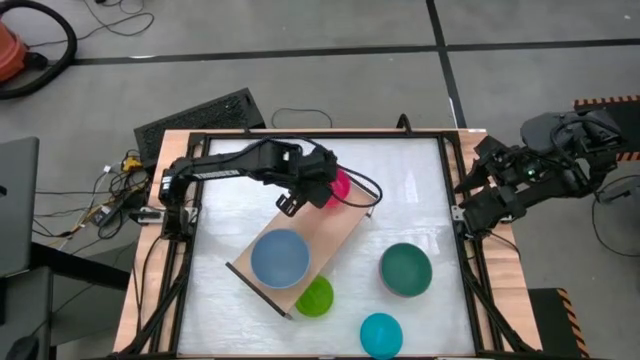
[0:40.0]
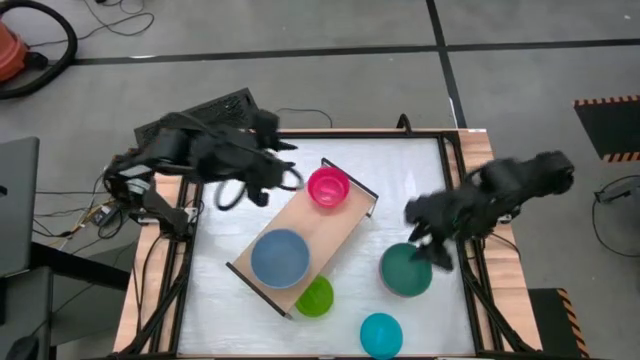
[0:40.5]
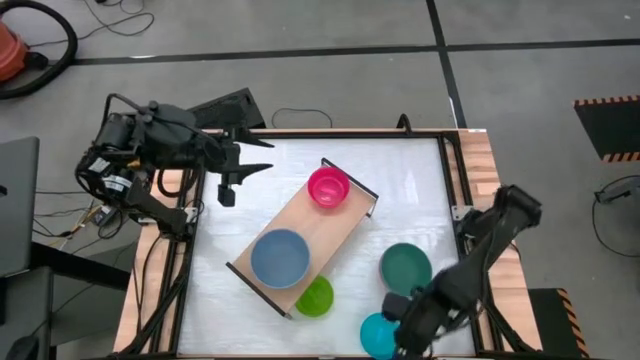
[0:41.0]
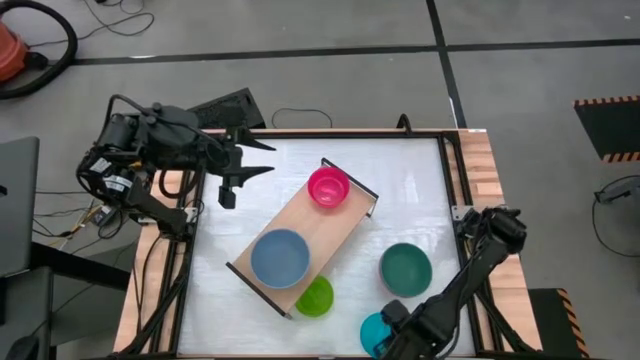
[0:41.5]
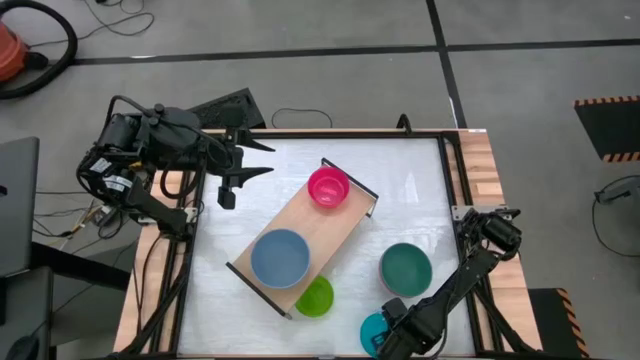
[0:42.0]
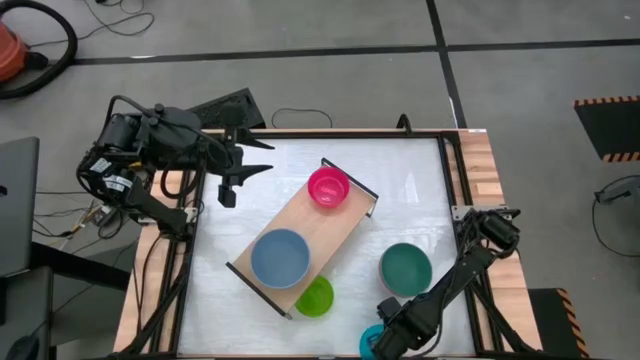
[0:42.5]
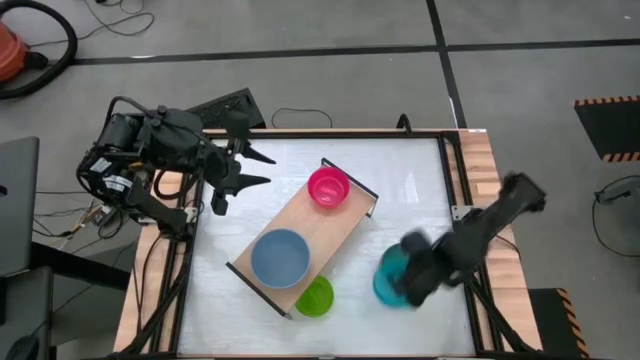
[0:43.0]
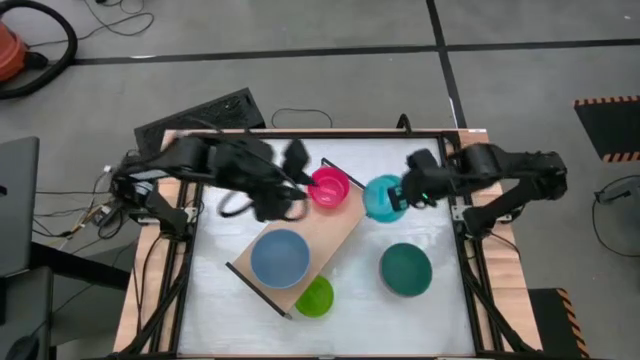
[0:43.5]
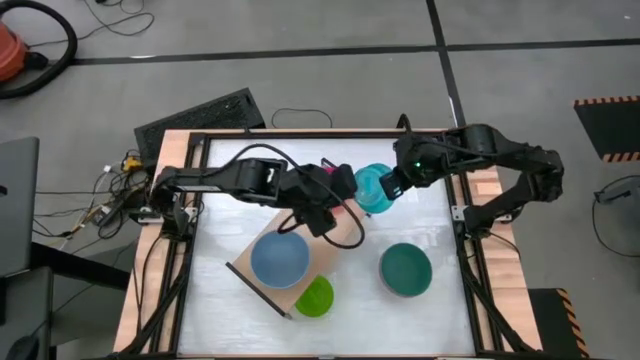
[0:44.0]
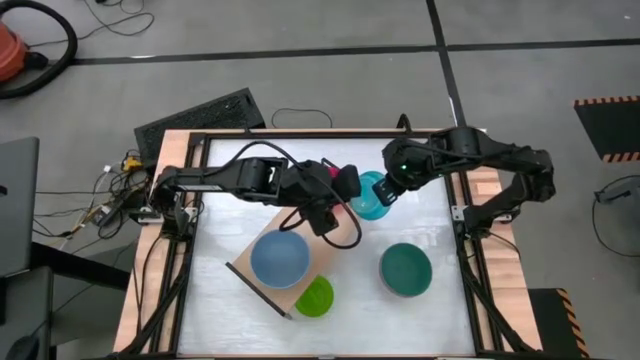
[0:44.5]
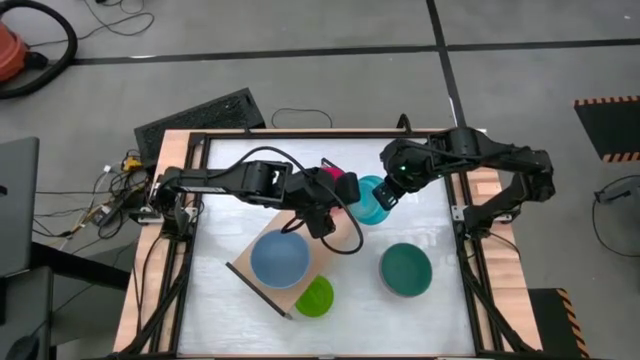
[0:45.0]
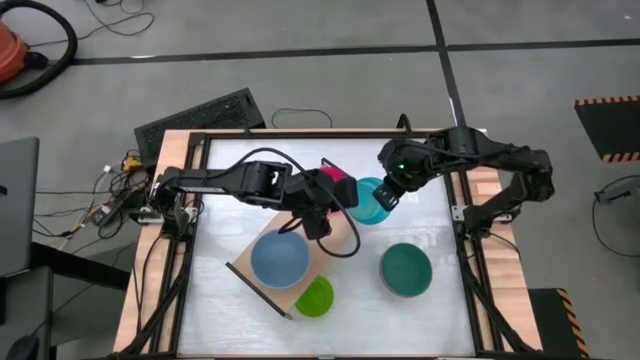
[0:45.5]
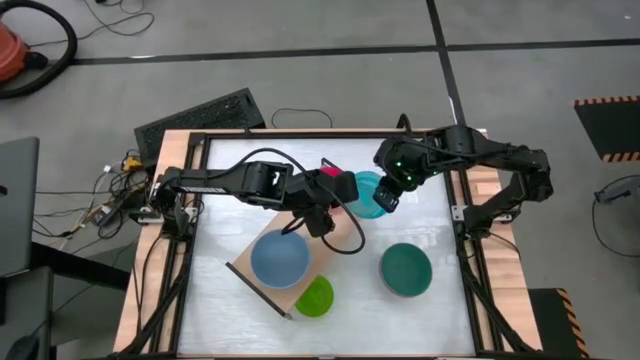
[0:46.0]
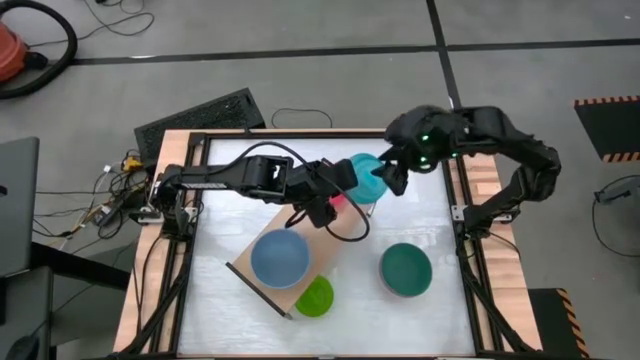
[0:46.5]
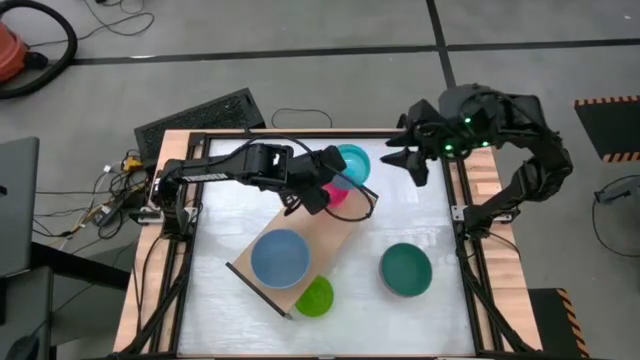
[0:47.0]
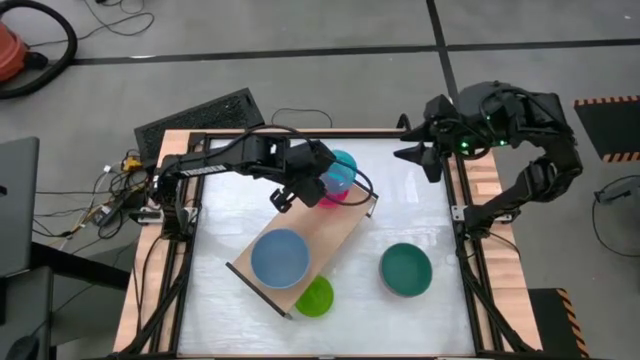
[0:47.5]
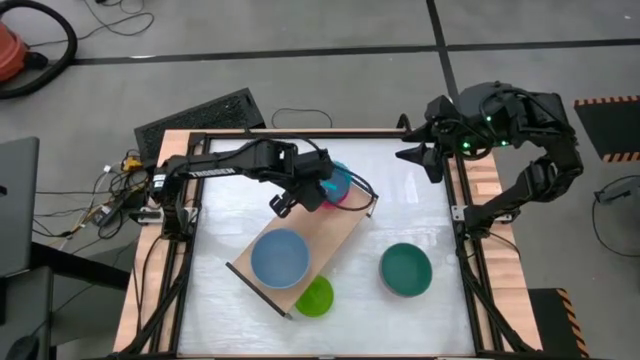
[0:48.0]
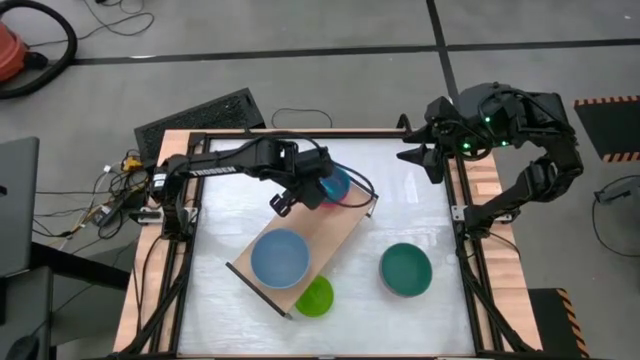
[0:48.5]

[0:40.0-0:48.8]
Task: Place and stack bowls onto a shelf
Stack the light blue bowl onto the pink bowl on the shelf

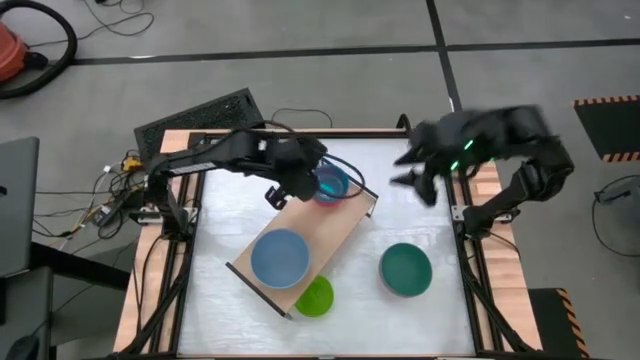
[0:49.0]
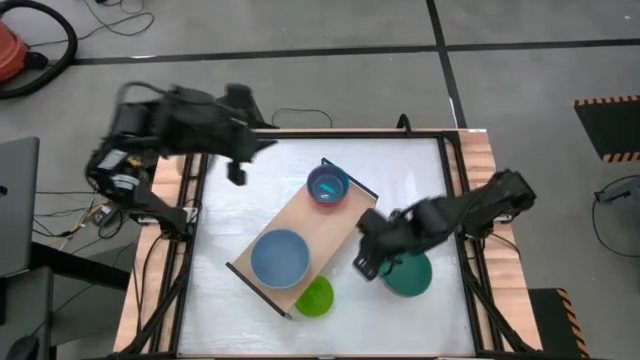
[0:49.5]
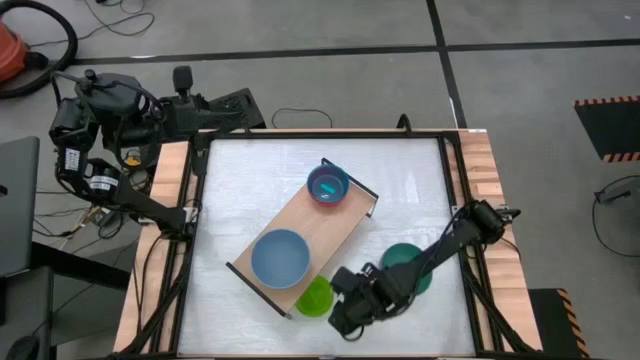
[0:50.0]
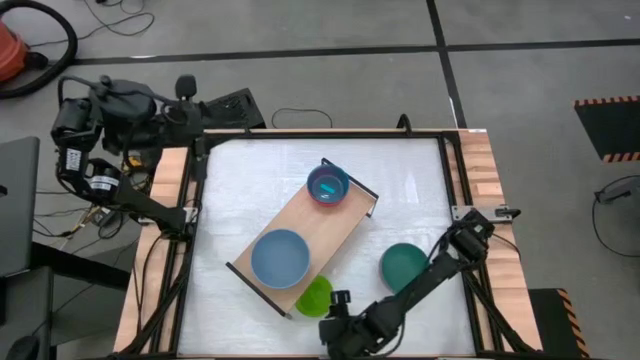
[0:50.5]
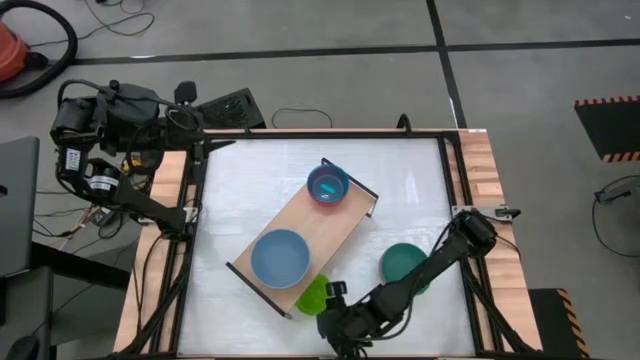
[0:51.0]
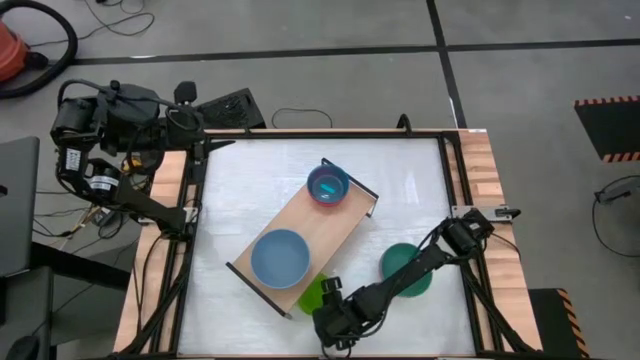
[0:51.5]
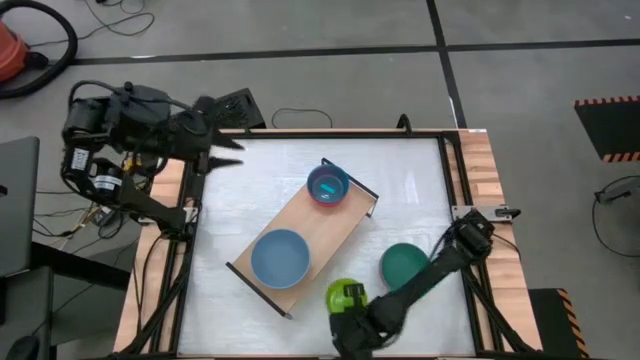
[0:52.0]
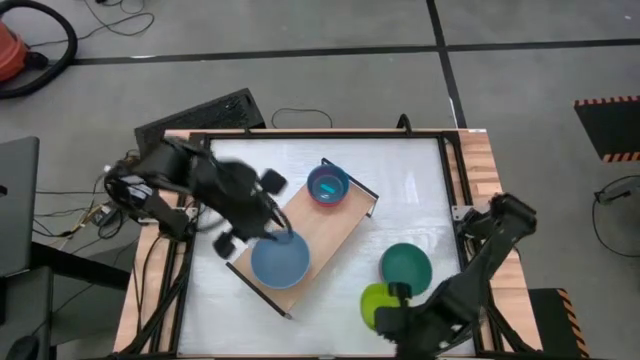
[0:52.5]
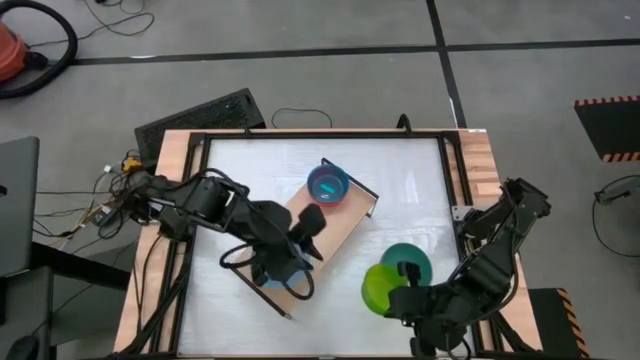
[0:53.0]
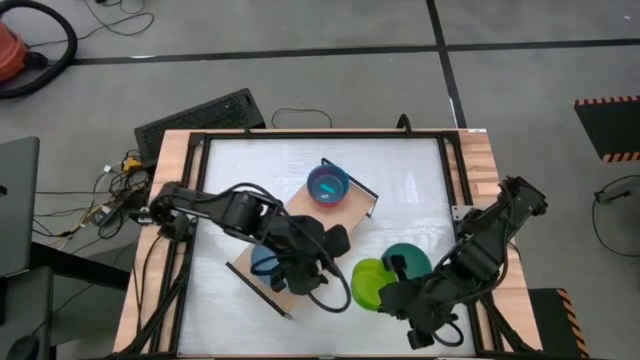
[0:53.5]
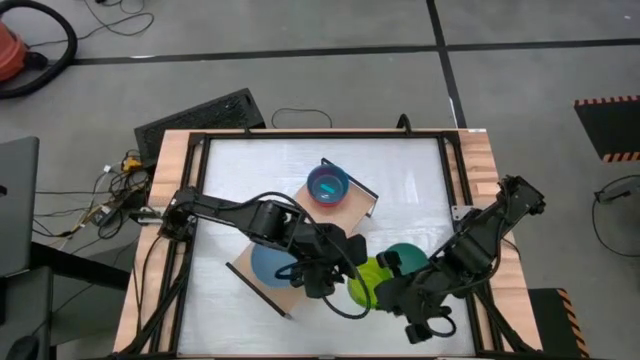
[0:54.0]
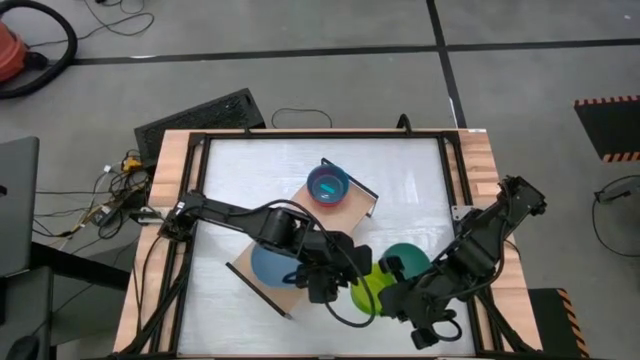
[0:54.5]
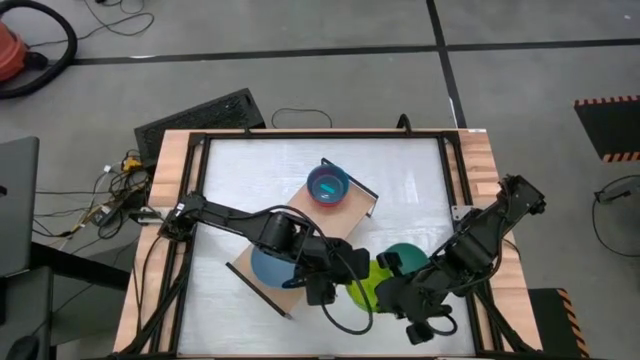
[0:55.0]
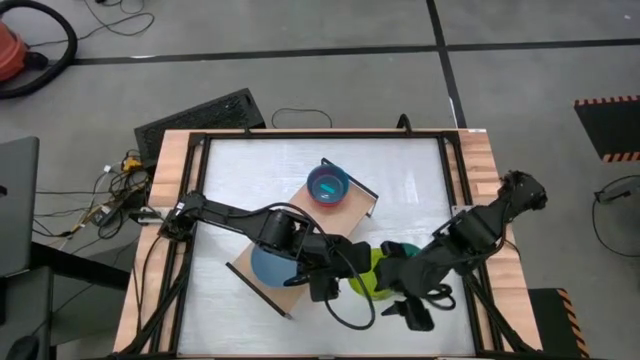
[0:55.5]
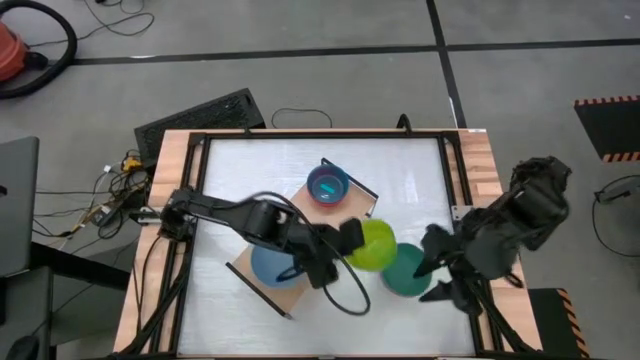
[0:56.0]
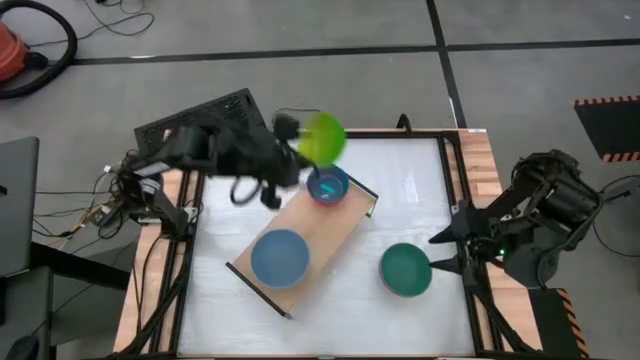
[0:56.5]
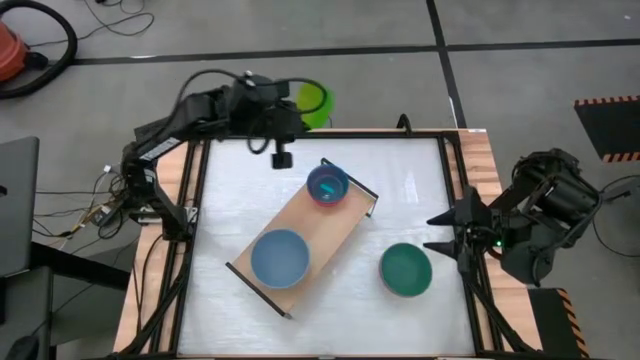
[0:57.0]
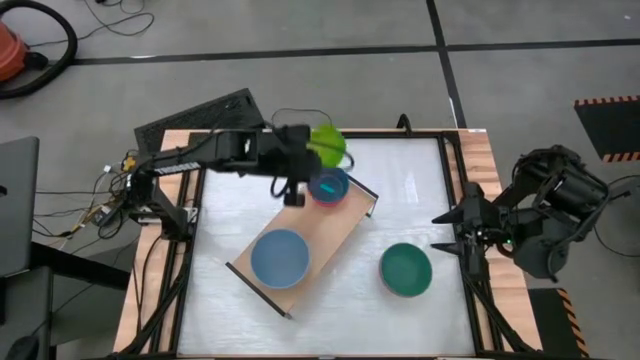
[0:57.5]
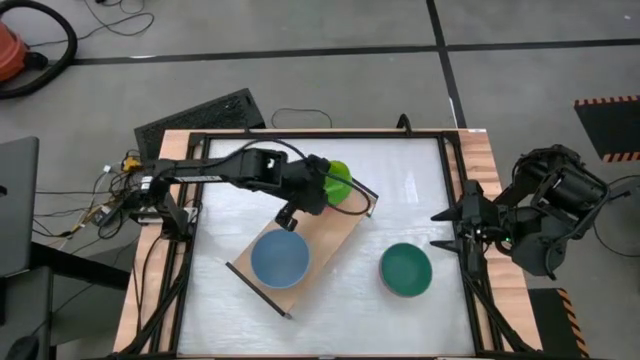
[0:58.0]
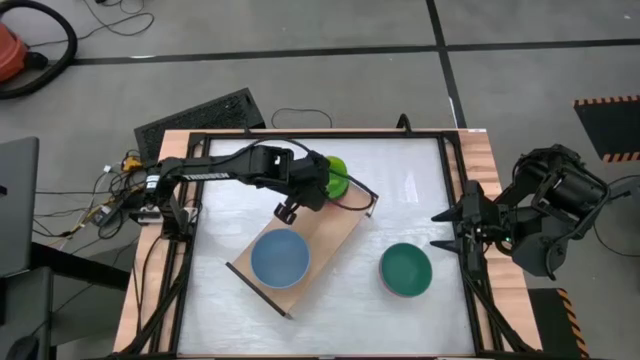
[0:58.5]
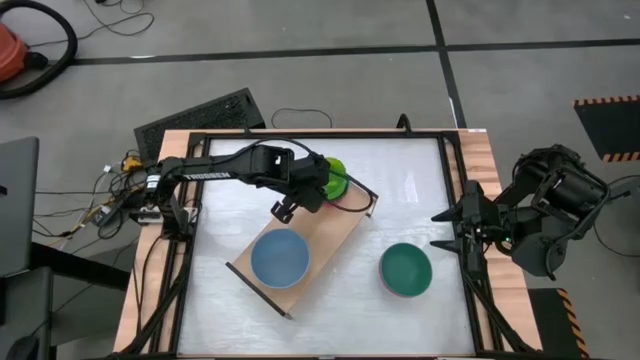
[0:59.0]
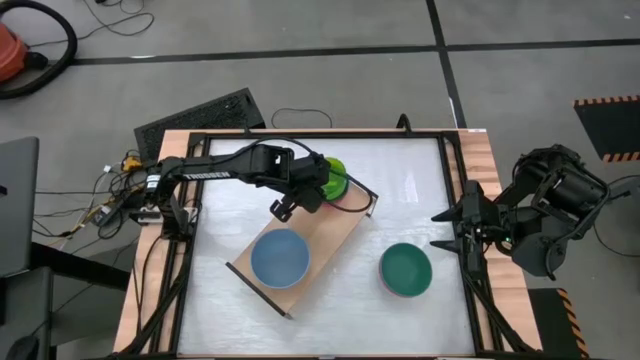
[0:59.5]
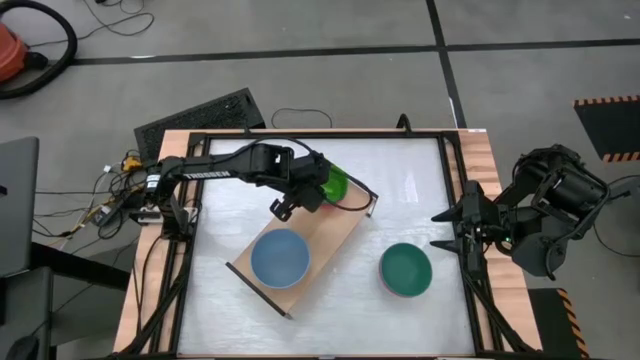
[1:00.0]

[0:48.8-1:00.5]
Stack the light green bowl onto the light blue bowl on the shelf

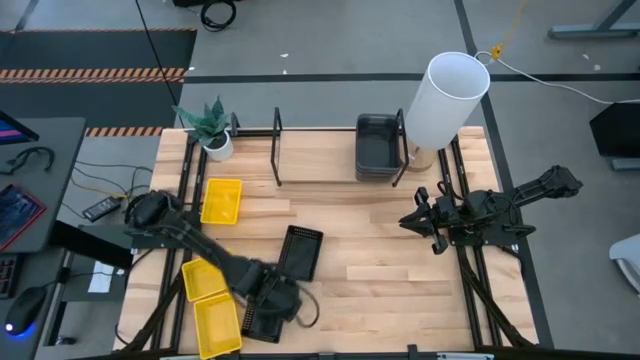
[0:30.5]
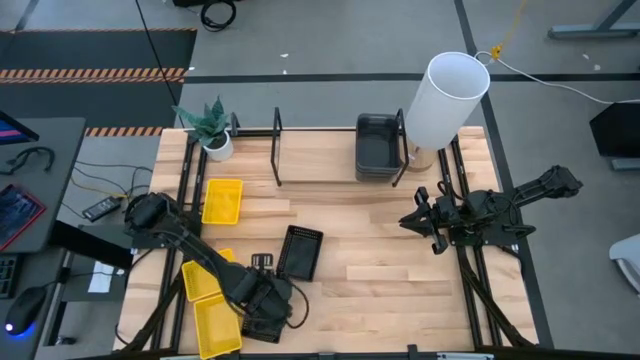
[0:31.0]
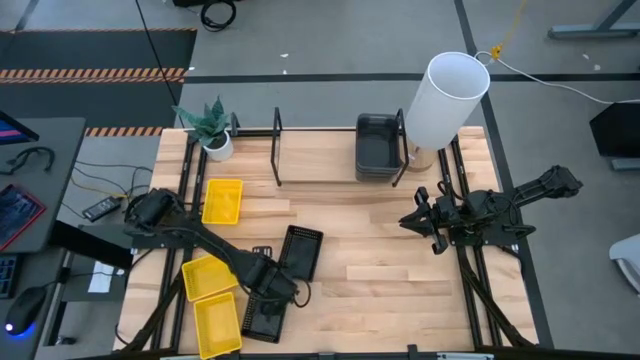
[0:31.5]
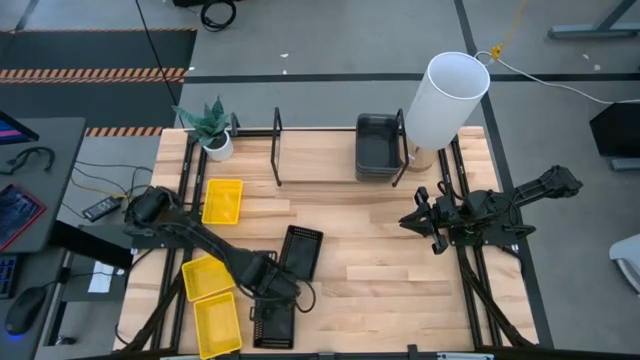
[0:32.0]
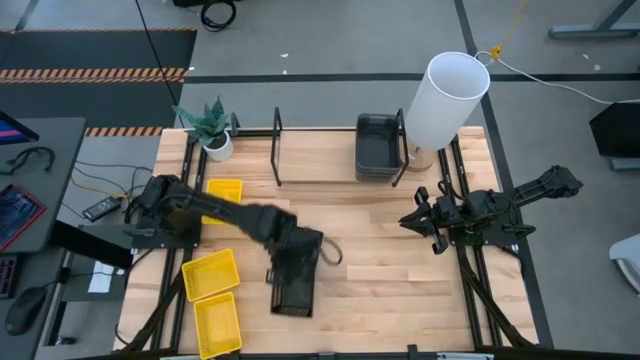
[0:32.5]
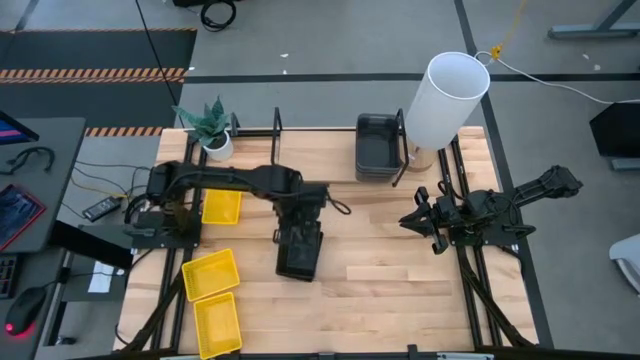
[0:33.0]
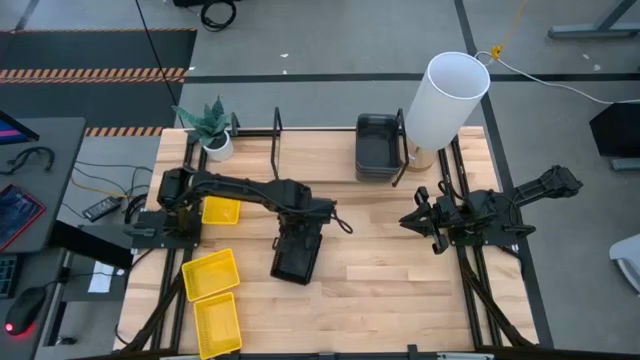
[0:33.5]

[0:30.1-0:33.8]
Task: Stack baskets on shelf by color
Stack the bottom black bin on top of the top black stacked bins
